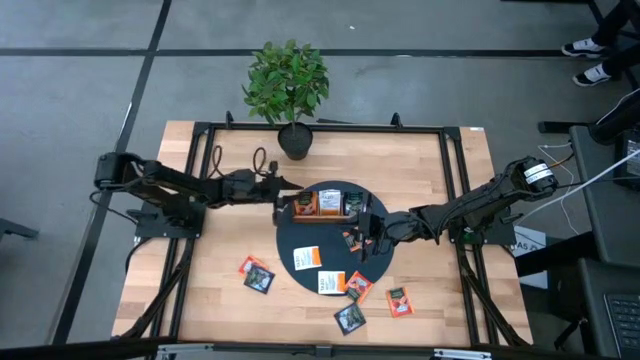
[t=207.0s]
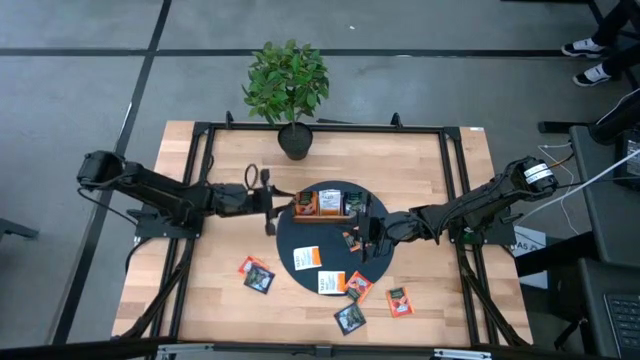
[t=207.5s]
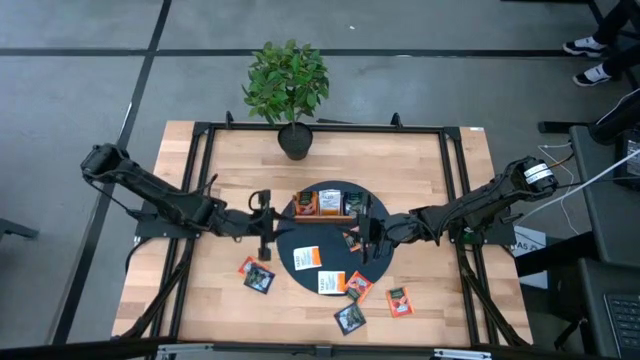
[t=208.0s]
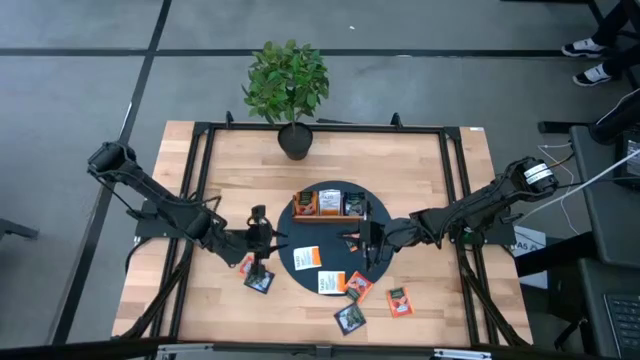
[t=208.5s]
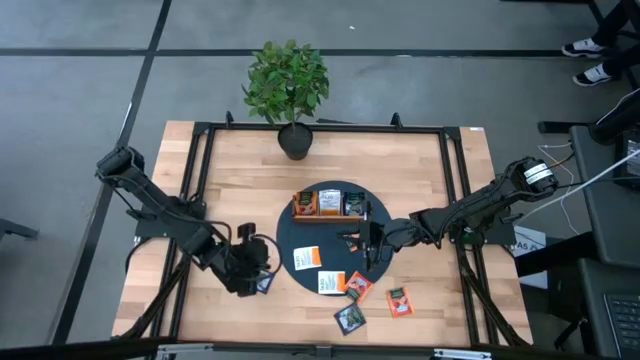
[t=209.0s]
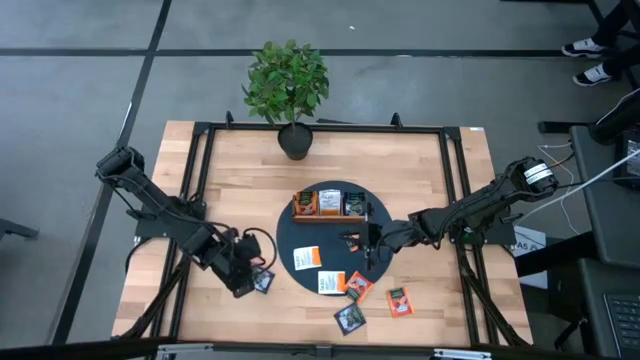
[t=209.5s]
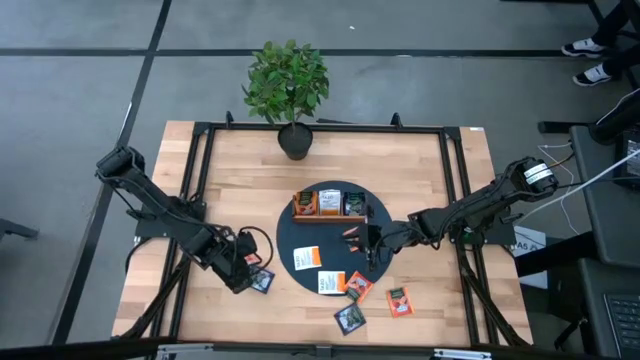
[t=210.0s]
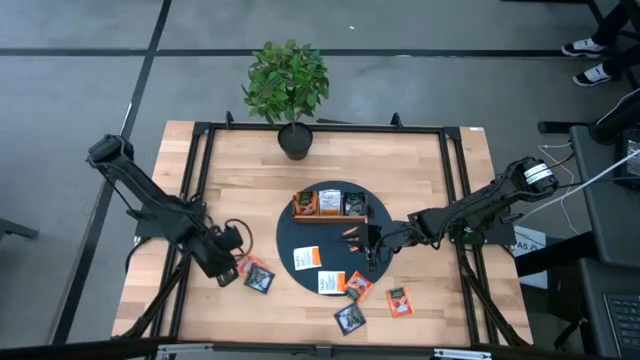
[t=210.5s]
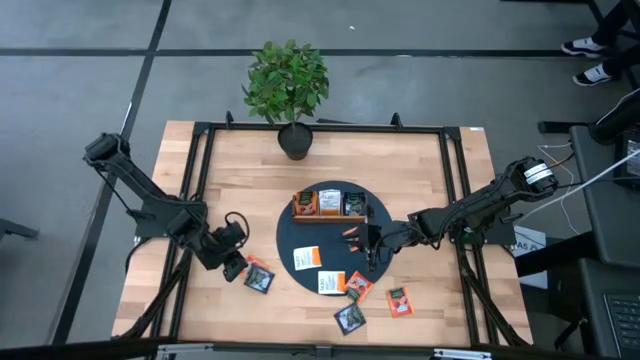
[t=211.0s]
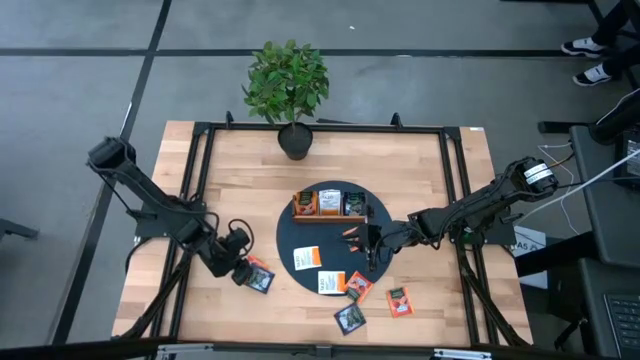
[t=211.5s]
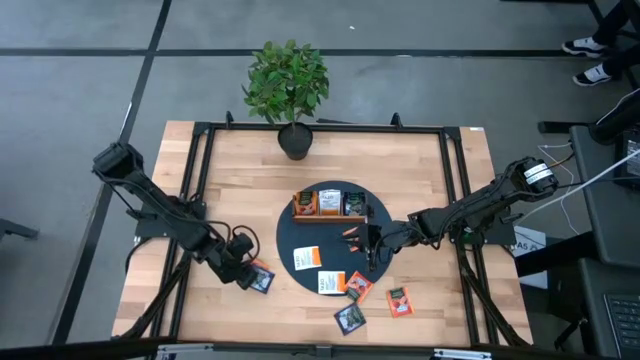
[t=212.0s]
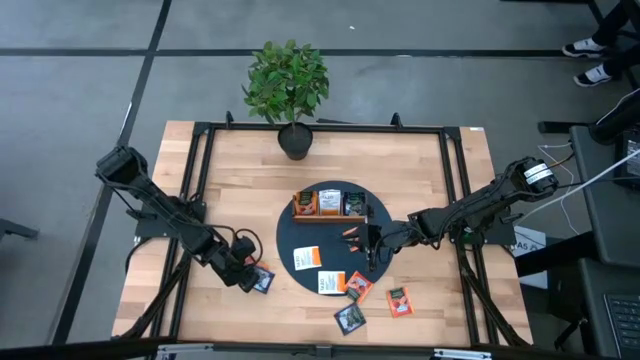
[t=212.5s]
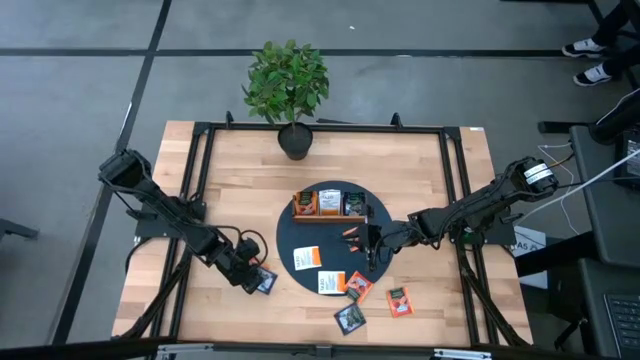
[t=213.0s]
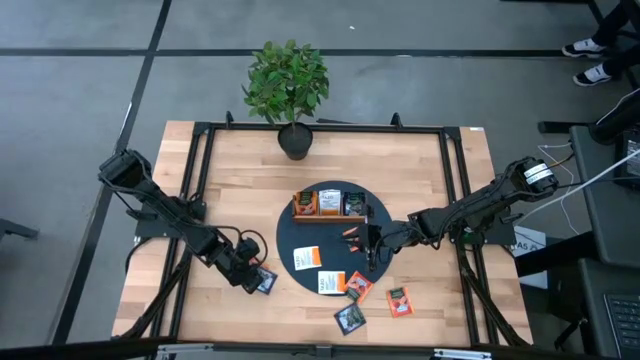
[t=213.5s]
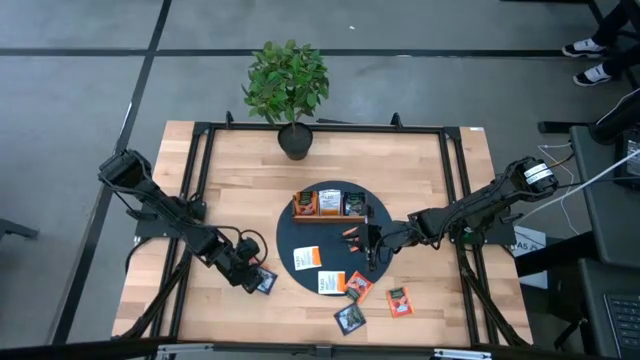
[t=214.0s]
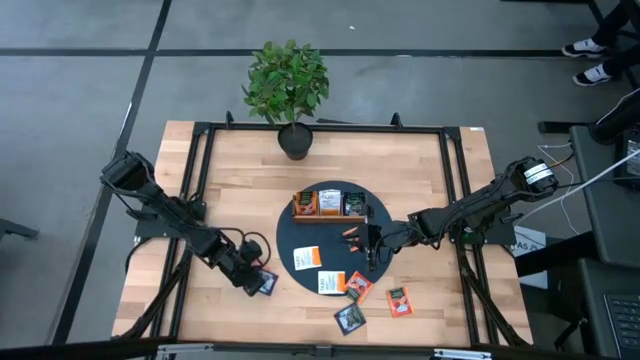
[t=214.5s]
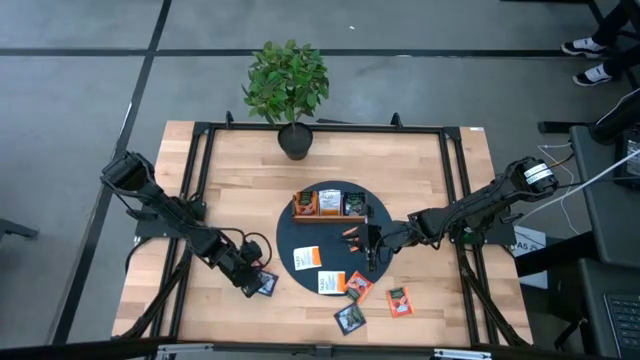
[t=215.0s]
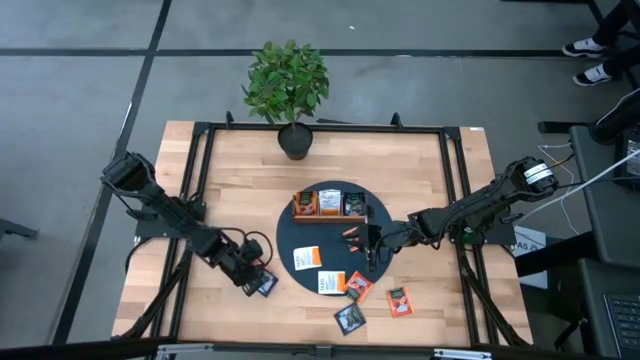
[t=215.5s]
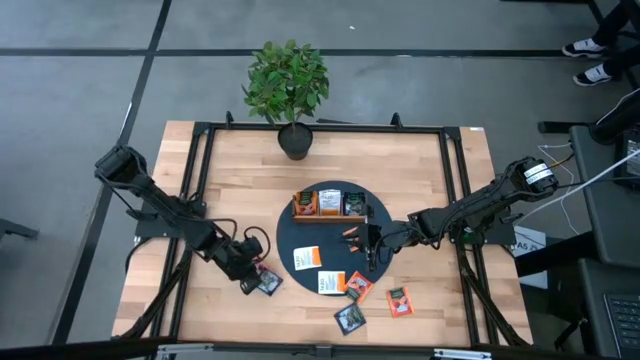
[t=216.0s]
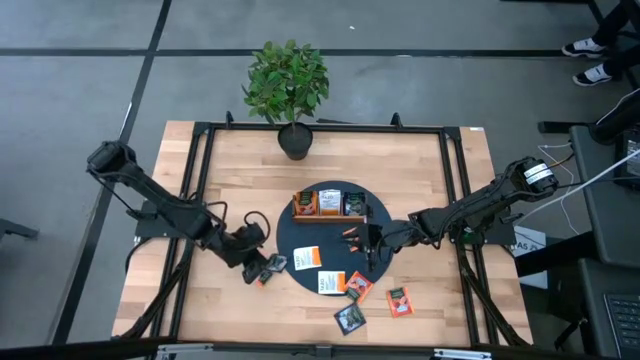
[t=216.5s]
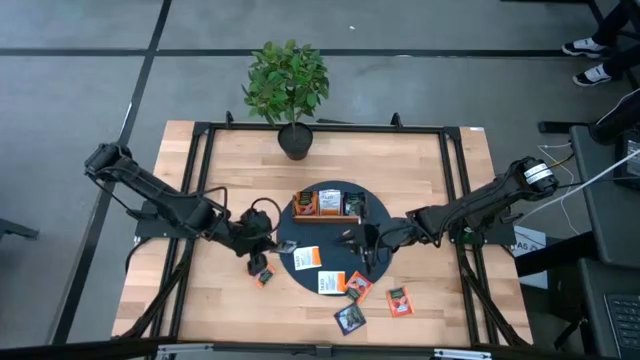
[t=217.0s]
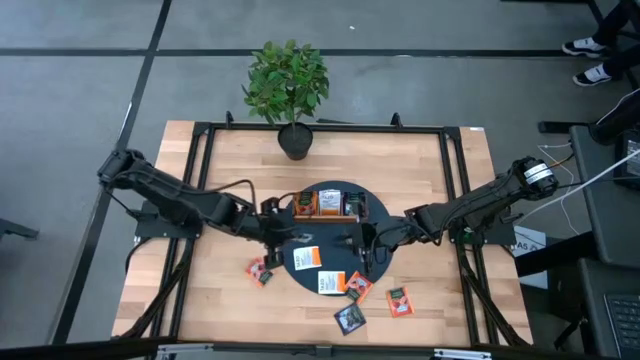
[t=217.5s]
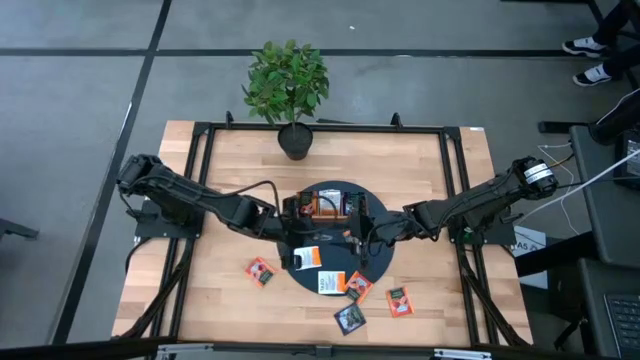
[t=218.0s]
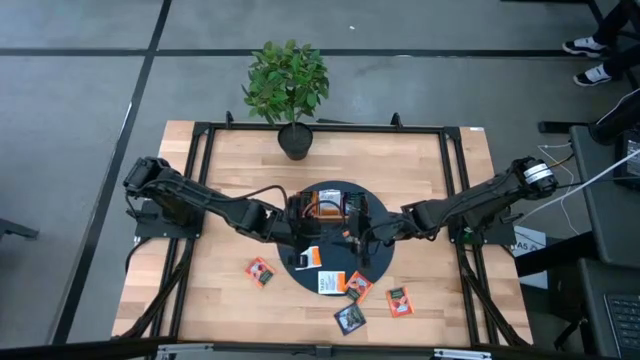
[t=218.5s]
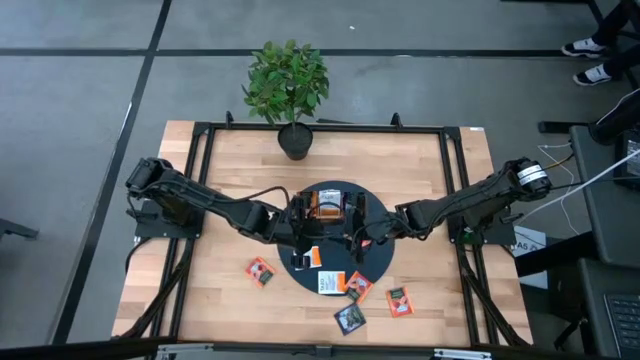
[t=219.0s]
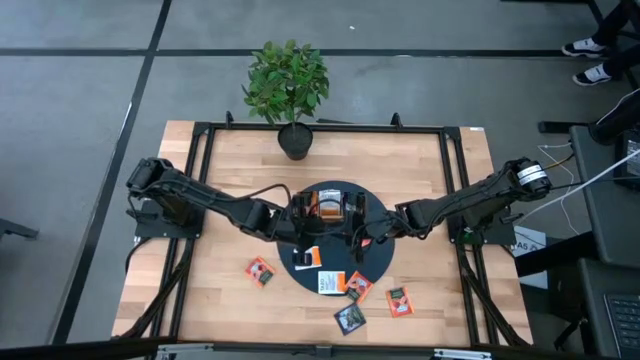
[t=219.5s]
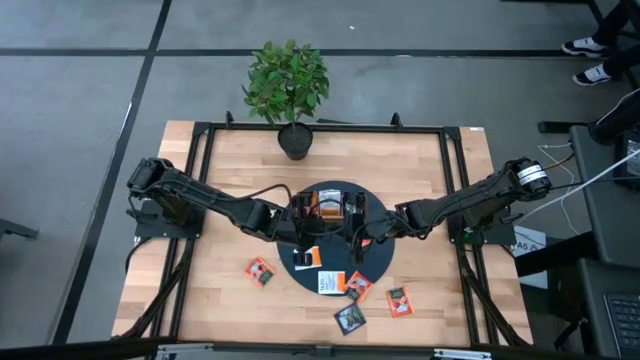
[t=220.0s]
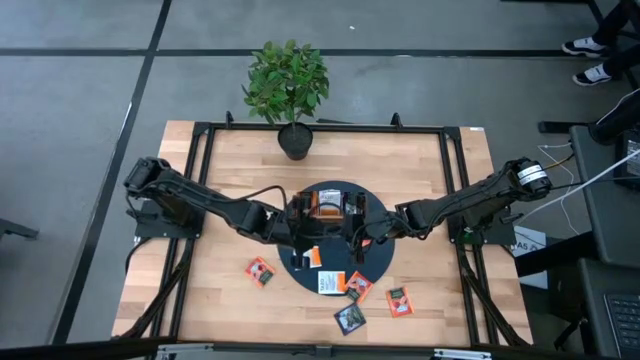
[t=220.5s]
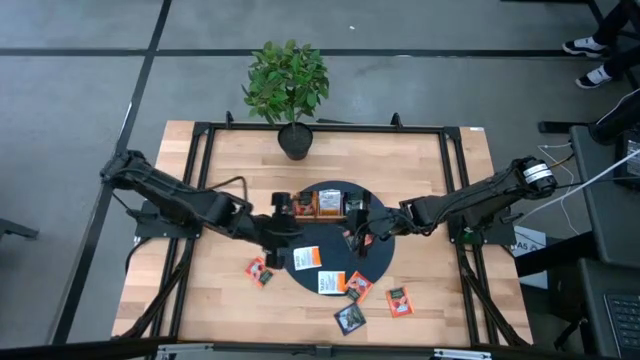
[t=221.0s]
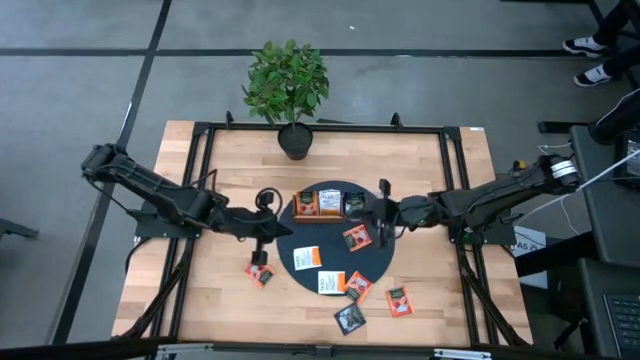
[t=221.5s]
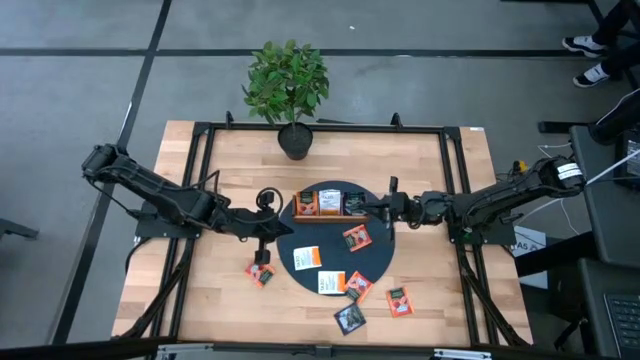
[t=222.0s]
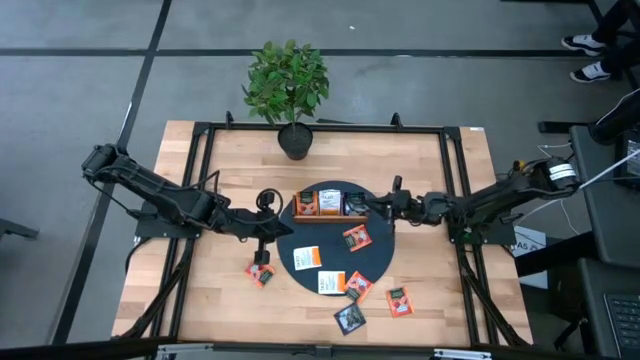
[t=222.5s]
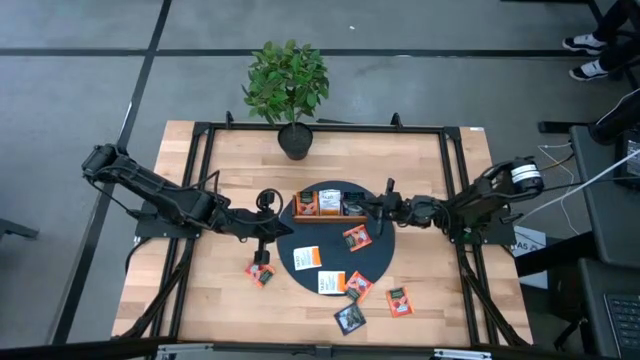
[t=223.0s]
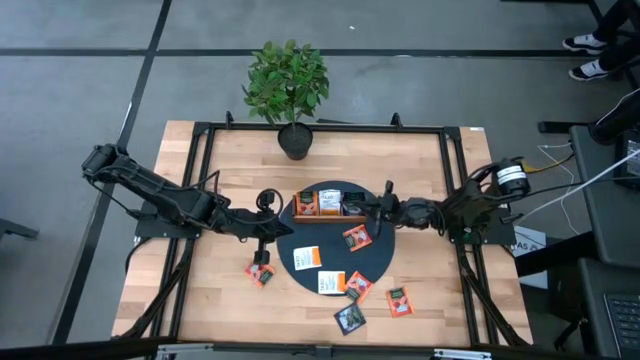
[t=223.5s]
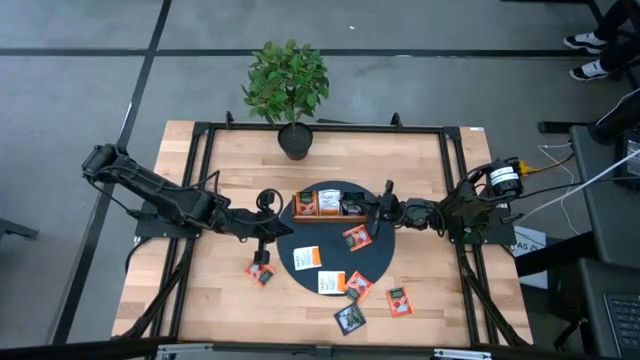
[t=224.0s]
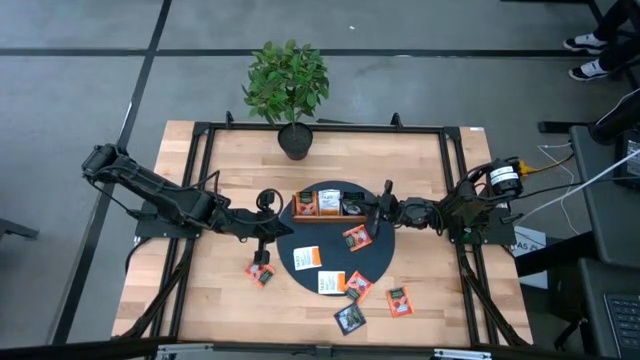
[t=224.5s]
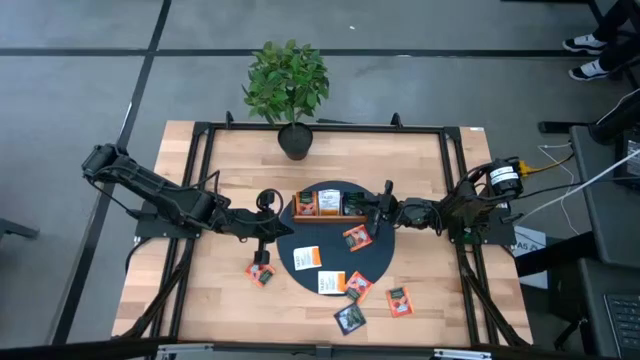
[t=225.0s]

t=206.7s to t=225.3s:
Task: Pick & Place Tea
Put the violet tea bag into the right side of the wooden organizer

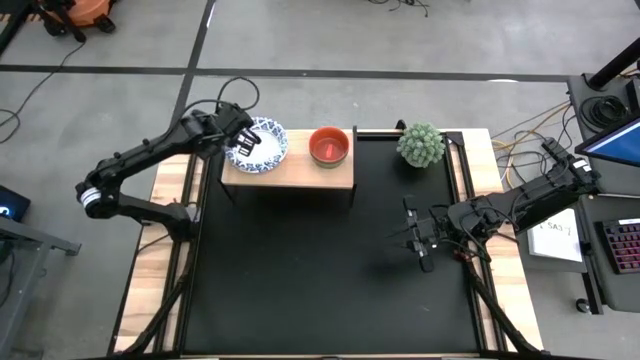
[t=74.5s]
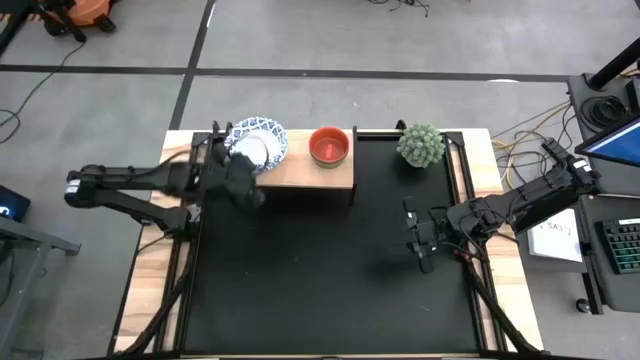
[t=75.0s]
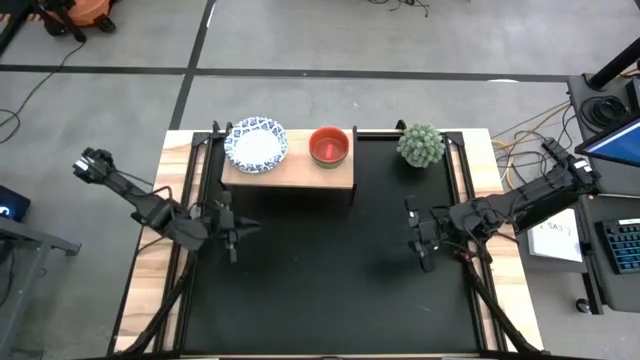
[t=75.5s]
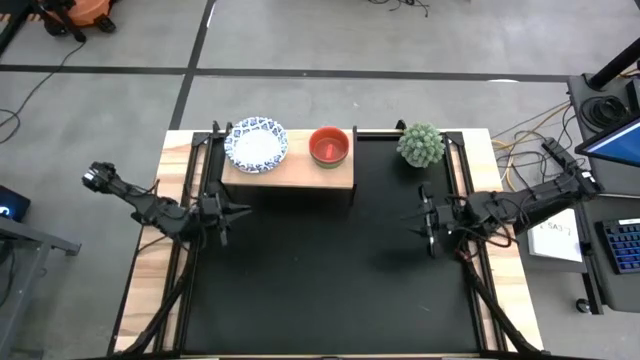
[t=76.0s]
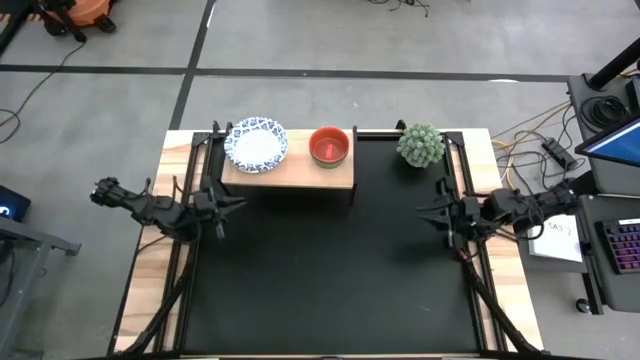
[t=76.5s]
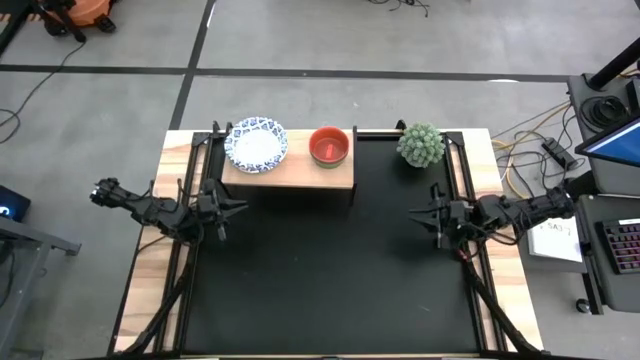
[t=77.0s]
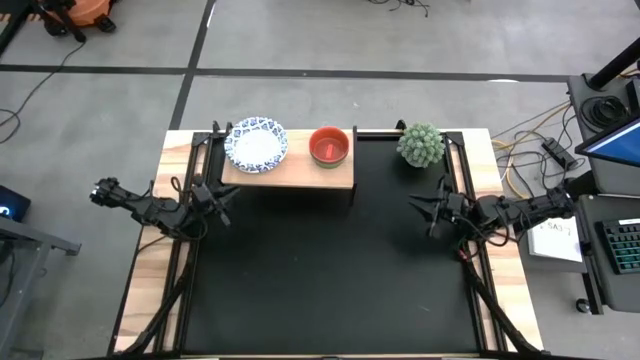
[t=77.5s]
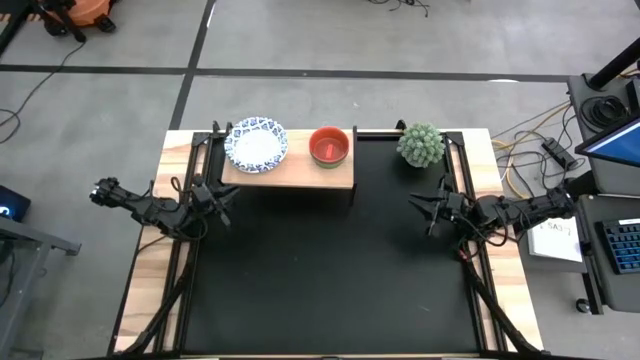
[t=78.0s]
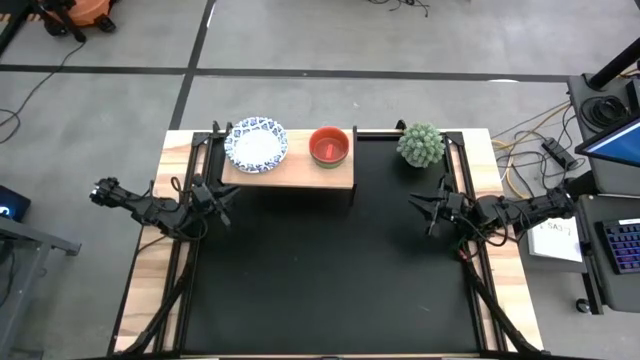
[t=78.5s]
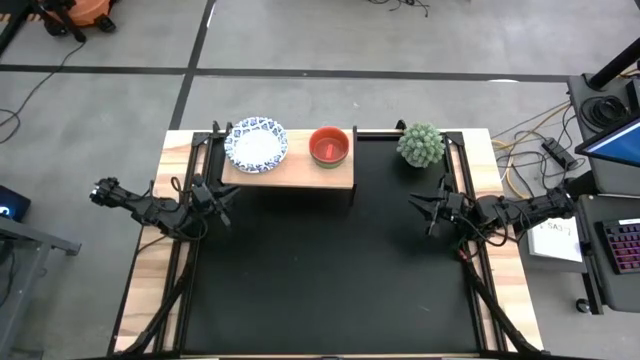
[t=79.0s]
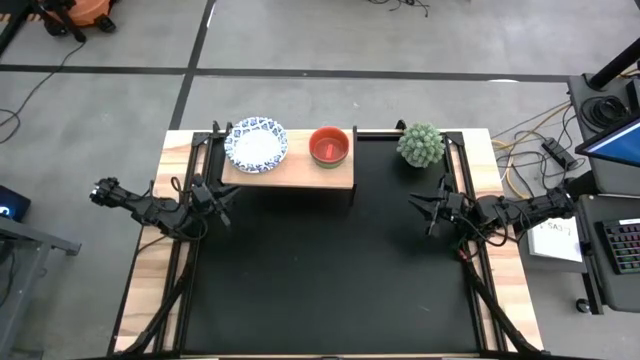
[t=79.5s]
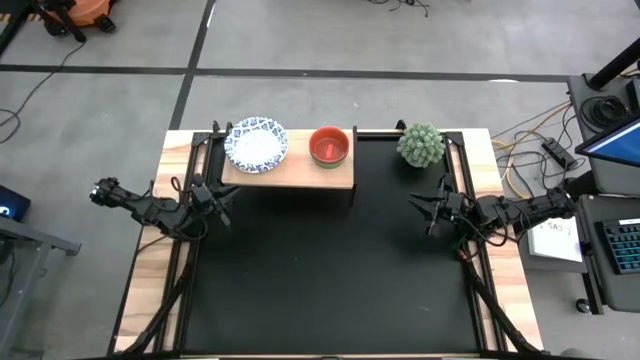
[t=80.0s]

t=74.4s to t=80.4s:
Task: Place and stack bowls onto a shelf
Return to Home Position
